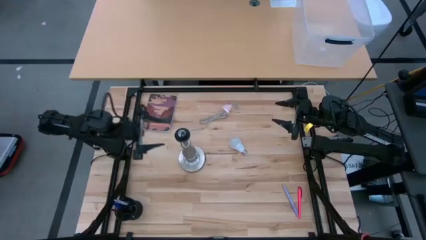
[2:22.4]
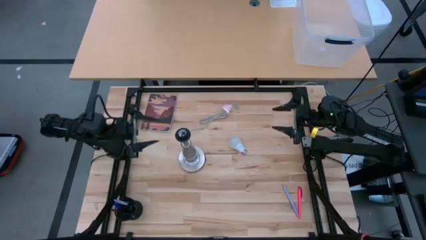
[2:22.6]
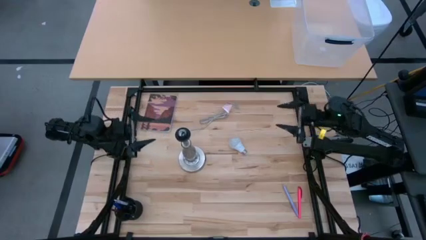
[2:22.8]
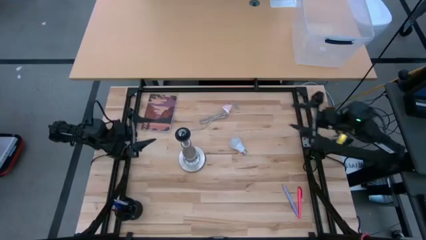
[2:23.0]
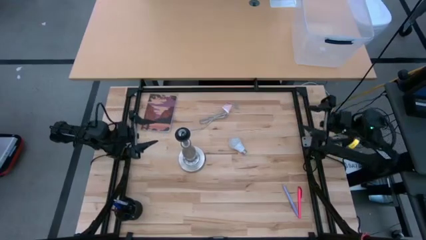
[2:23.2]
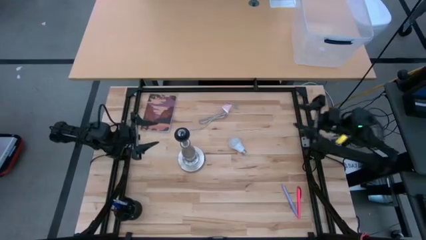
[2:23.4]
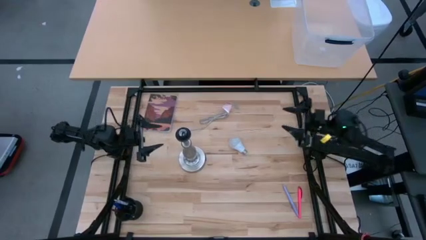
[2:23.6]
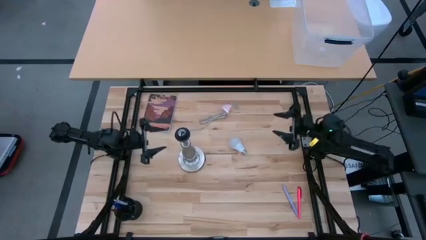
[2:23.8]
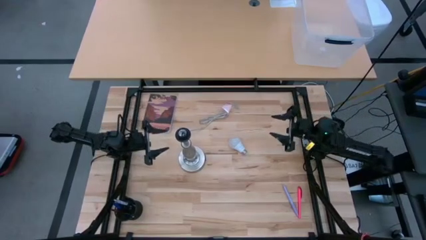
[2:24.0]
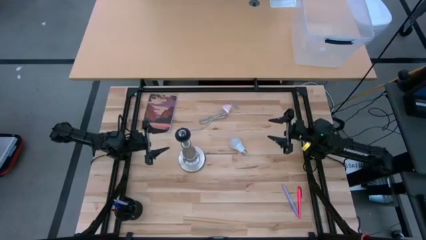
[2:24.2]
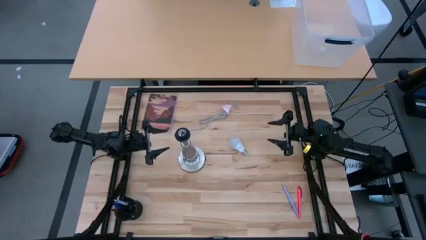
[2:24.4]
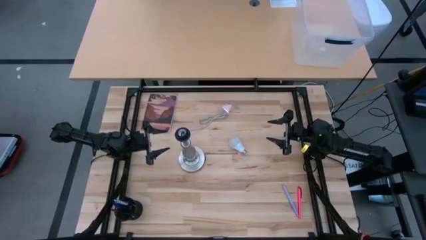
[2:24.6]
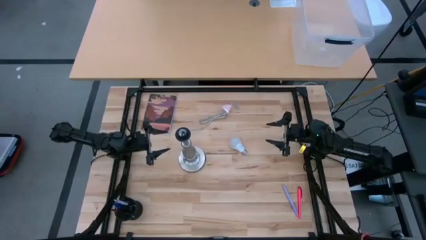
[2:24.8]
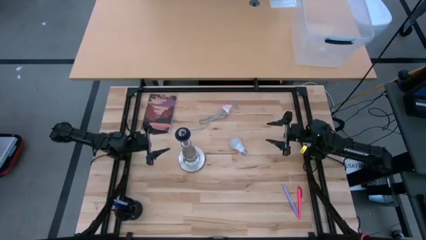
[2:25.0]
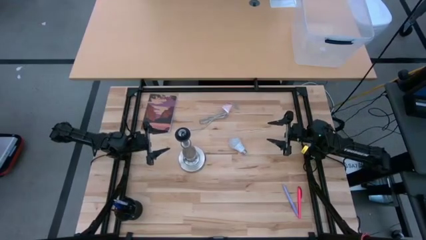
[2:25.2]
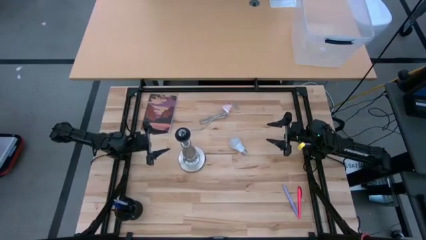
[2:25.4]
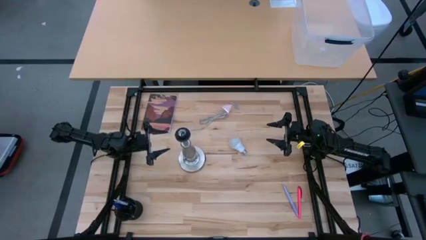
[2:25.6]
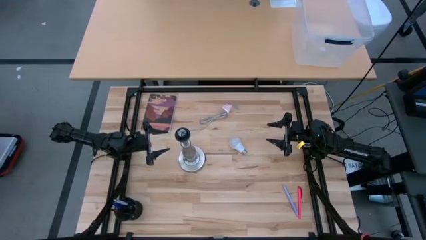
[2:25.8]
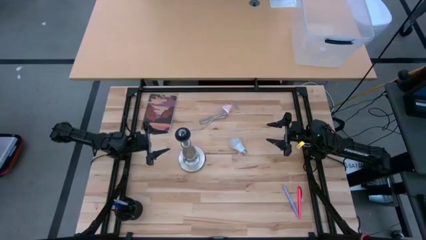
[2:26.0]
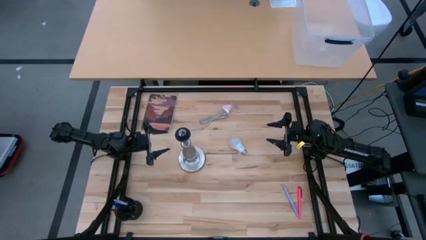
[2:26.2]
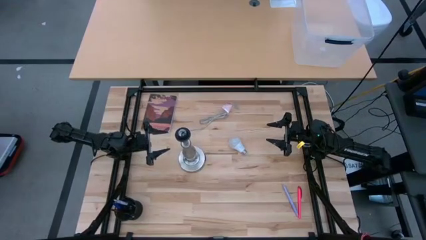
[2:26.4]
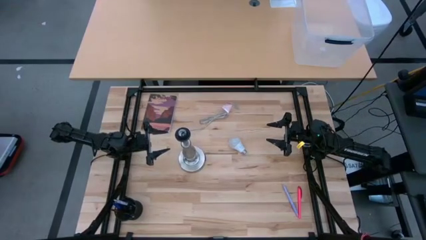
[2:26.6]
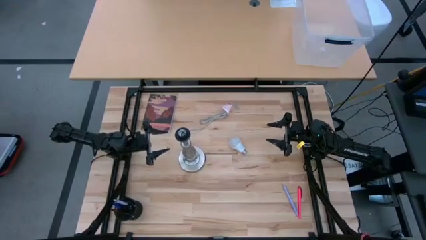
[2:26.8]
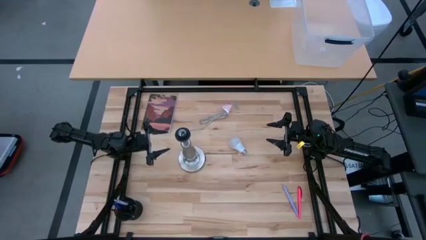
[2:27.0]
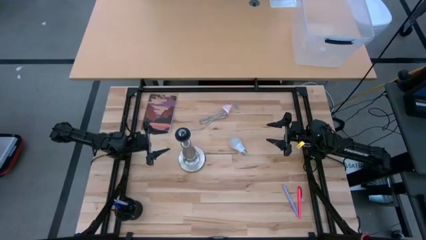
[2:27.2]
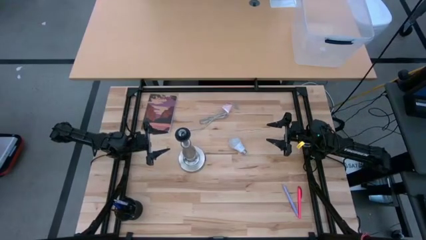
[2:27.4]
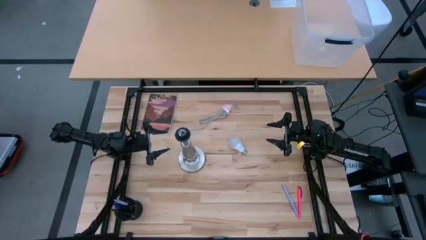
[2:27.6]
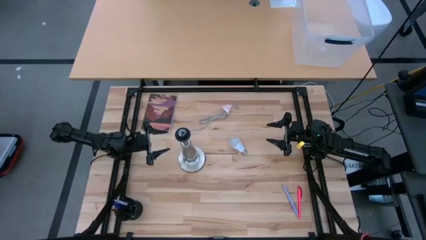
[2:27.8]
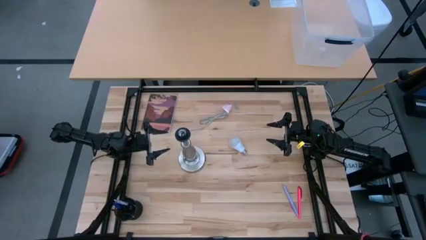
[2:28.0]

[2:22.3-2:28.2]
Task: Screw lightbulb
Return to Home Position

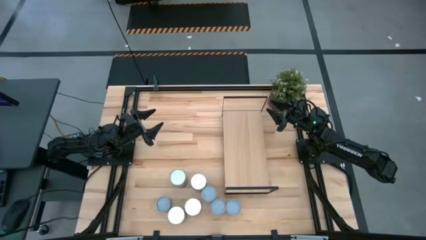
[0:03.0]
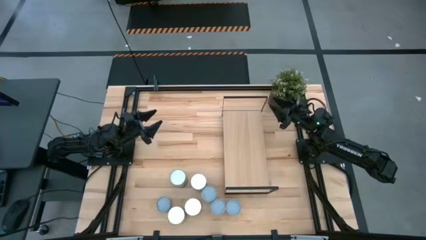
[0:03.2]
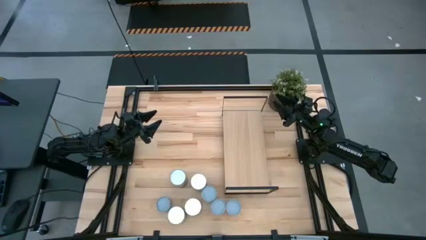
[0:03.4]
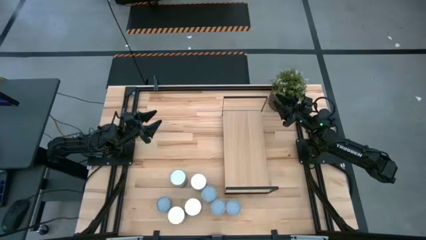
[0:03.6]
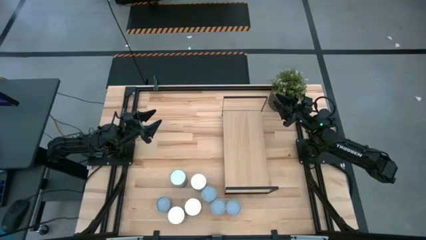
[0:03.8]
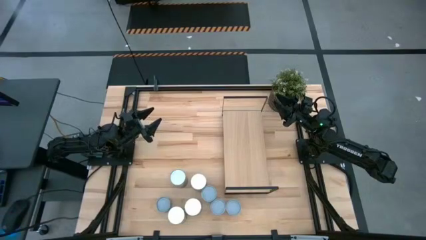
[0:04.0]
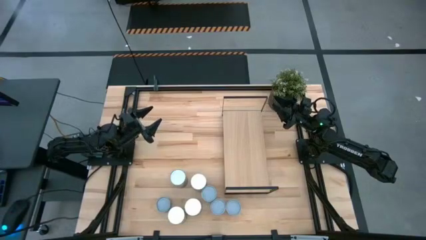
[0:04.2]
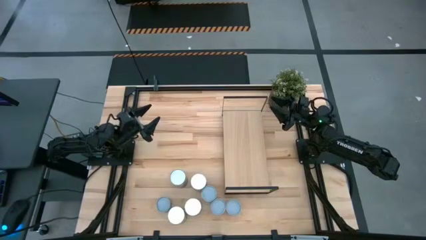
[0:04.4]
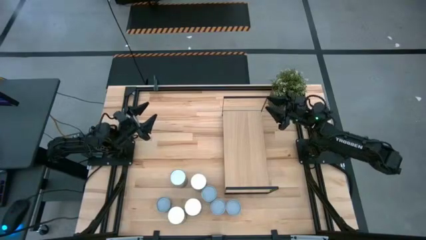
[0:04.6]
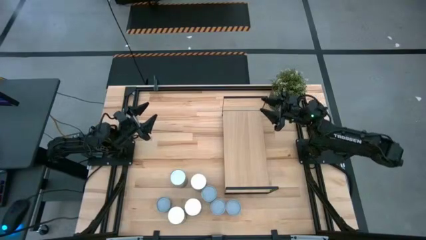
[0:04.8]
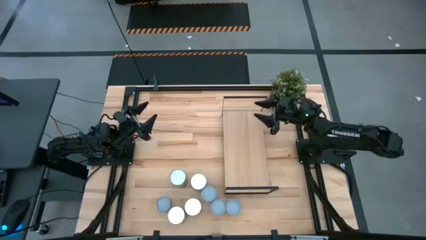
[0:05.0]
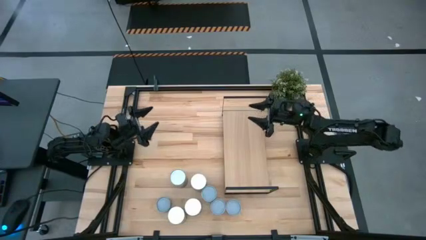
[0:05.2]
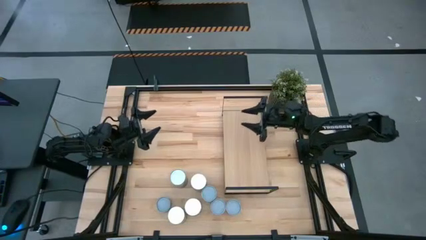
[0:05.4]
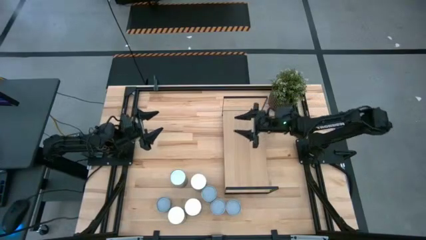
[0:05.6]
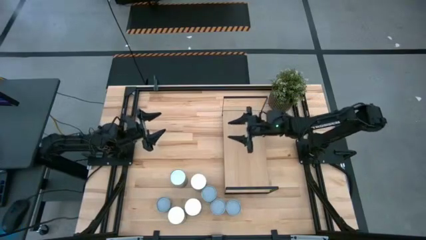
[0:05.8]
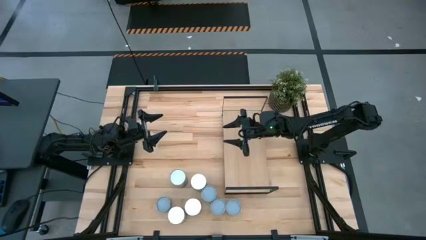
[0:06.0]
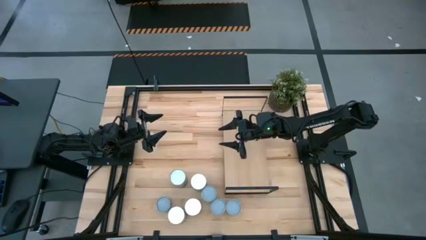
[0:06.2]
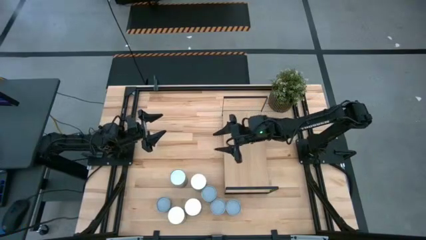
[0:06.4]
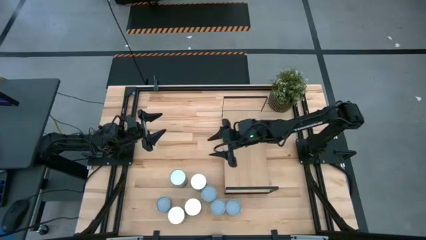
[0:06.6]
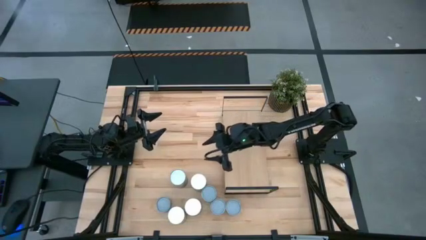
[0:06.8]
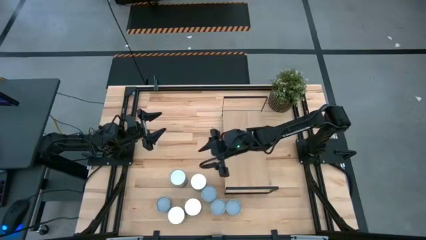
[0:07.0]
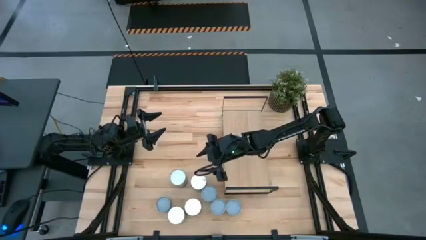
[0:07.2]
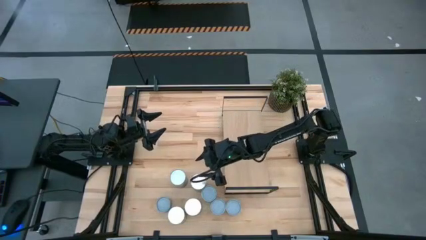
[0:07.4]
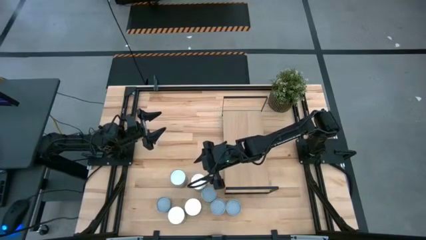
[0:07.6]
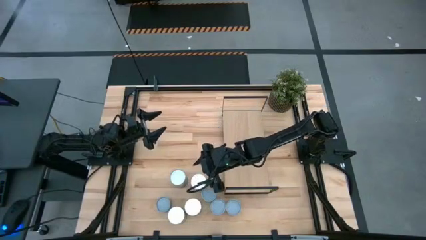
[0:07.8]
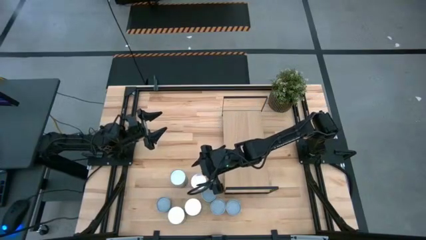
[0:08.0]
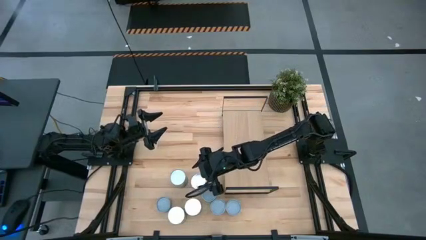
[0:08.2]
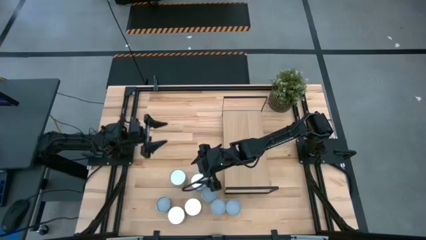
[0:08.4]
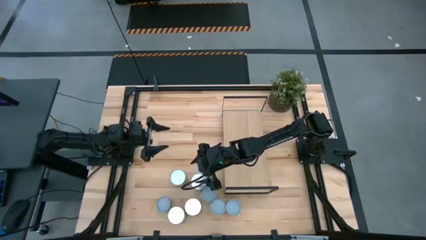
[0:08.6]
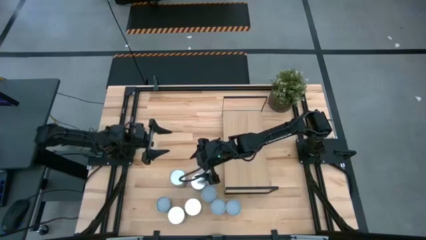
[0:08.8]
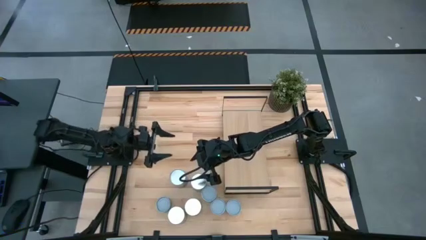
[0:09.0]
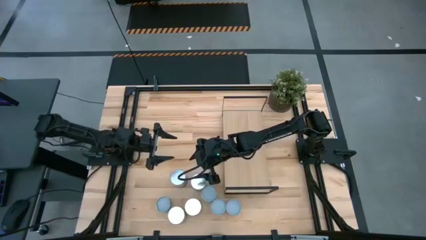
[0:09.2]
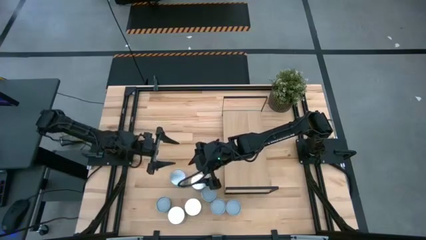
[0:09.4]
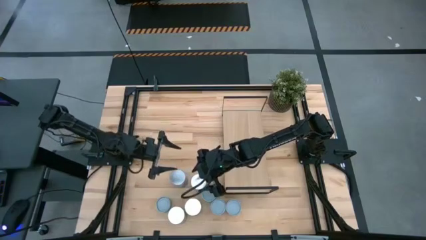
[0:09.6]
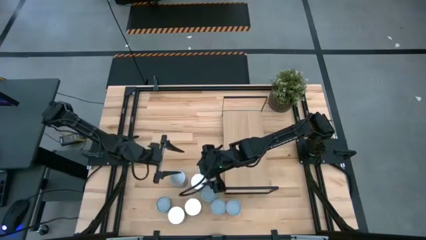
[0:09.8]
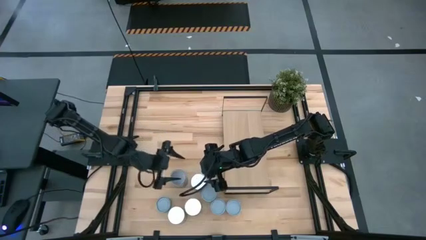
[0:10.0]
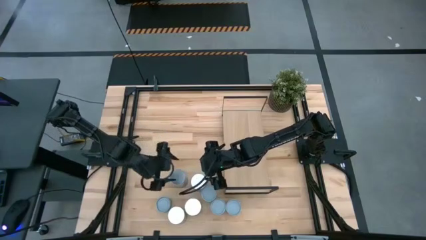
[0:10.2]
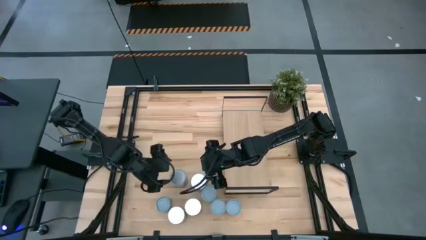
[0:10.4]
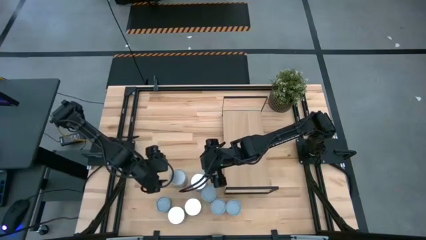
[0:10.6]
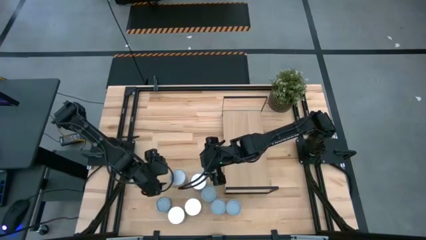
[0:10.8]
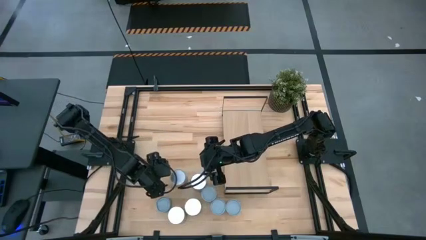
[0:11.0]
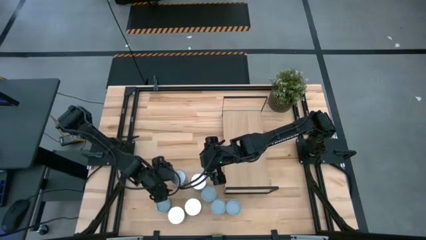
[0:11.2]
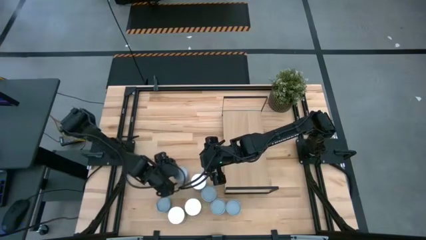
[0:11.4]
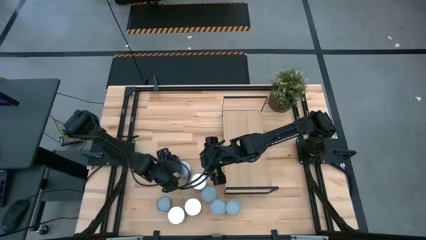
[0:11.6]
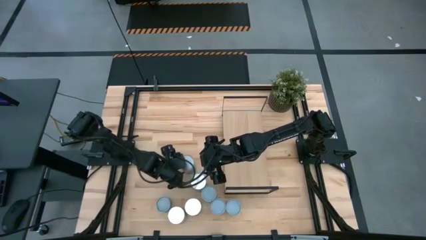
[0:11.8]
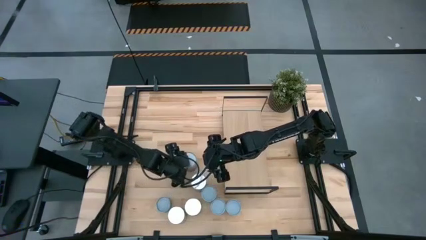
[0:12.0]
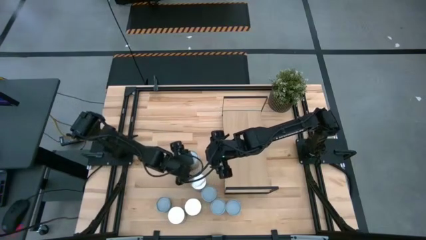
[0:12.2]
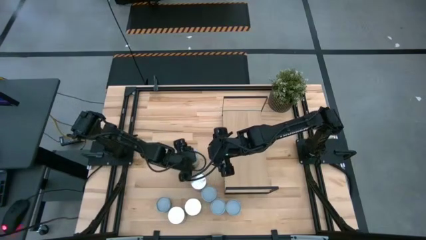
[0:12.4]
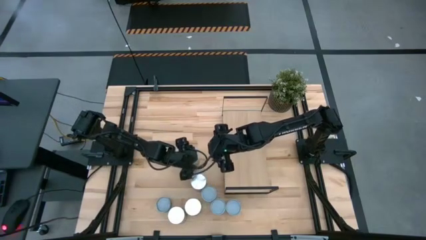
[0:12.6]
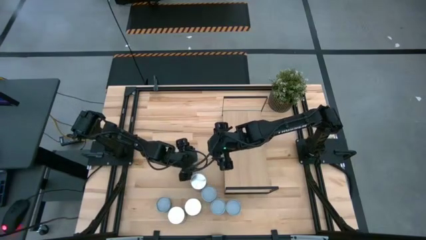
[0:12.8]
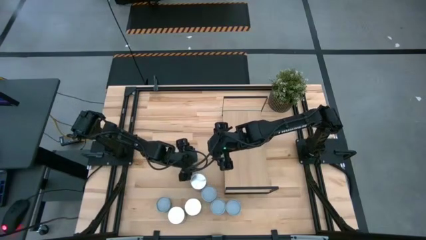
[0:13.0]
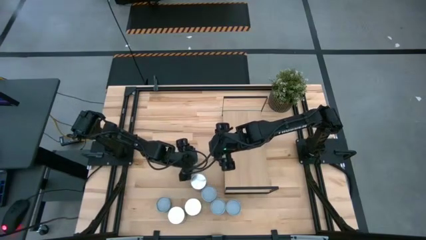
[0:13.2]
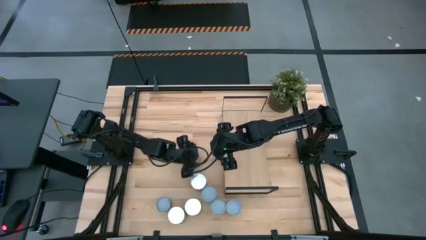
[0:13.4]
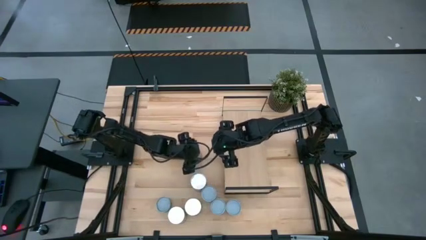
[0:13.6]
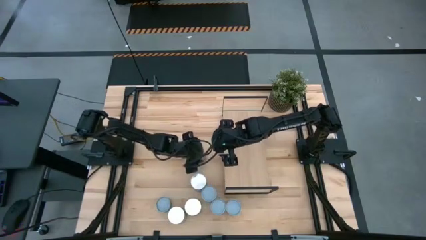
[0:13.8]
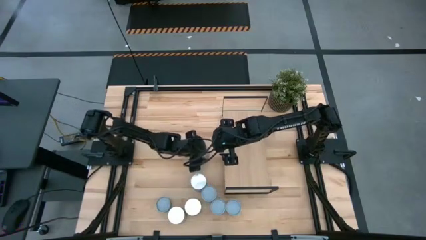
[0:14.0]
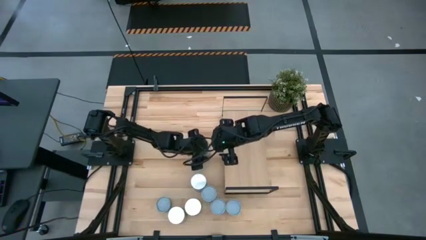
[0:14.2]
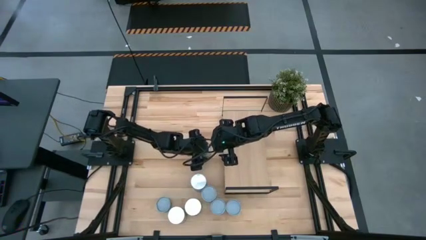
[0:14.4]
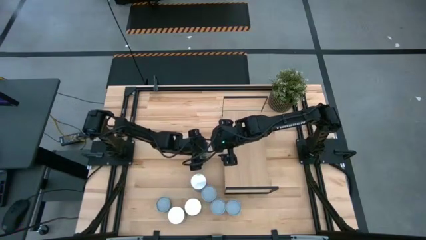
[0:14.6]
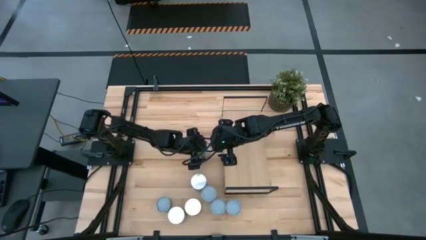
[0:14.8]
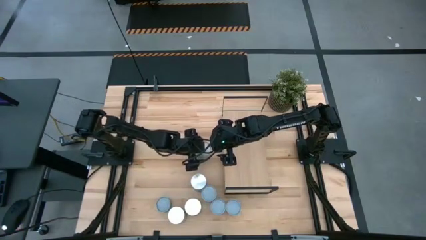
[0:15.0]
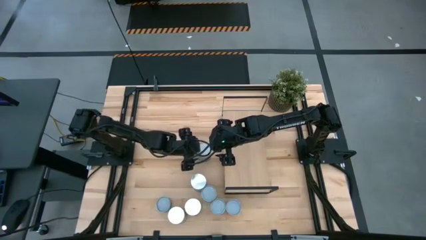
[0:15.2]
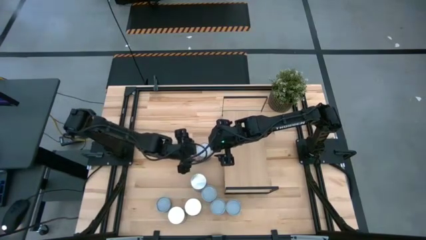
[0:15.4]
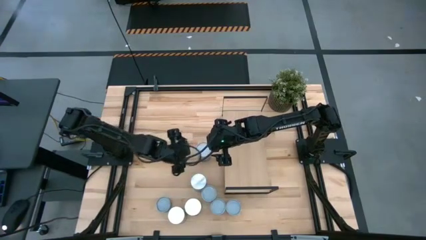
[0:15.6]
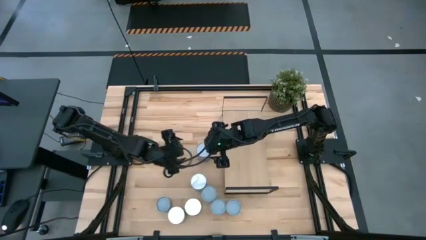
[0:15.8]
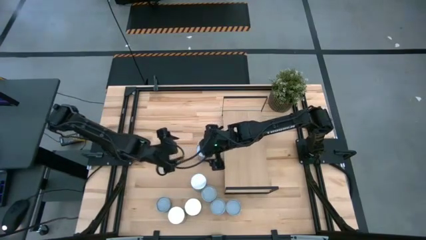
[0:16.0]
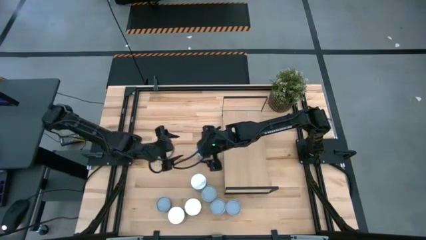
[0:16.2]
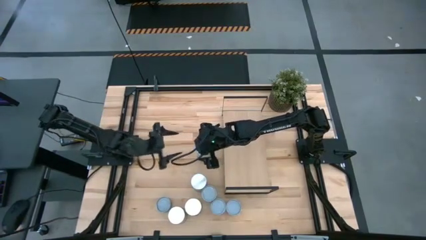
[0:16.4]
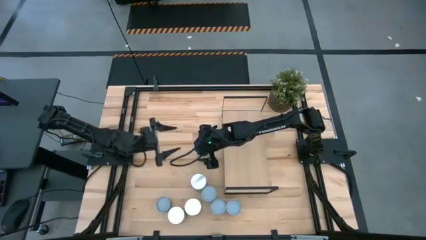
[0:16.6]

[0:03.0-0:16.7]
Task: Pick and place cans onto a shelf
Put the canned peas on the shelf
